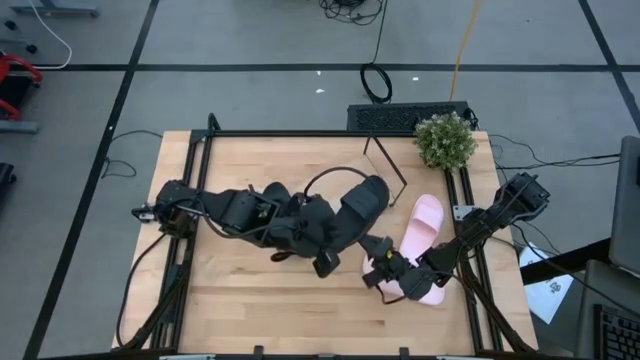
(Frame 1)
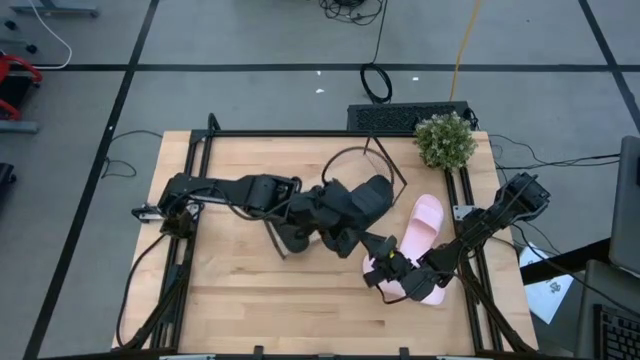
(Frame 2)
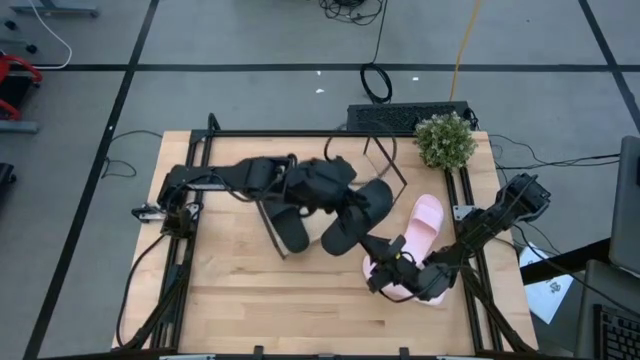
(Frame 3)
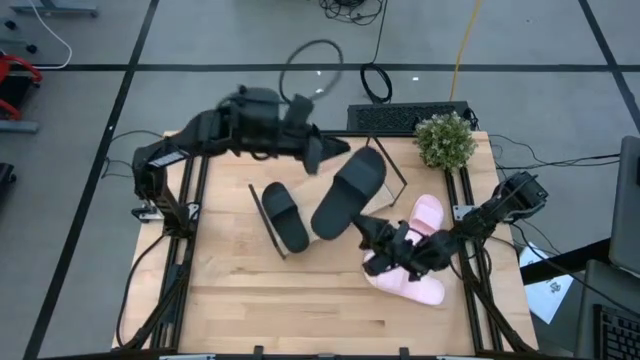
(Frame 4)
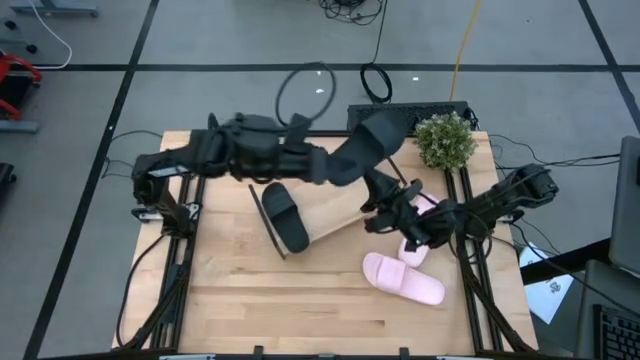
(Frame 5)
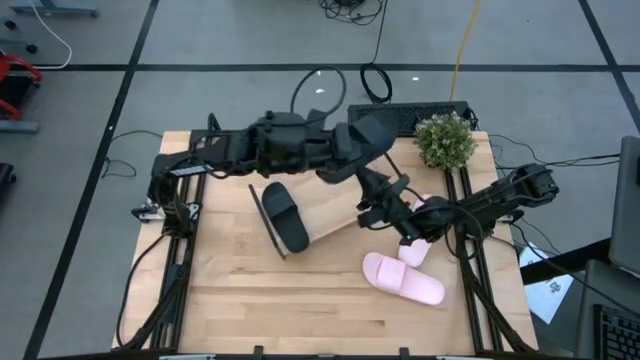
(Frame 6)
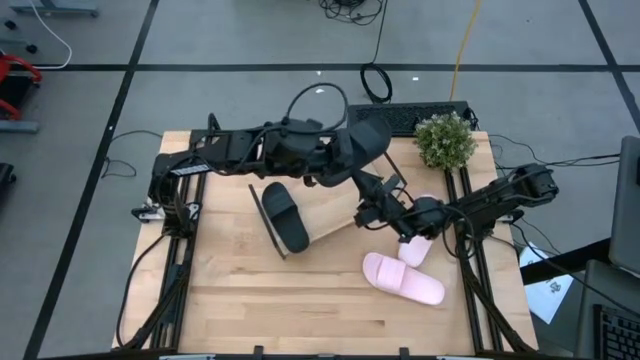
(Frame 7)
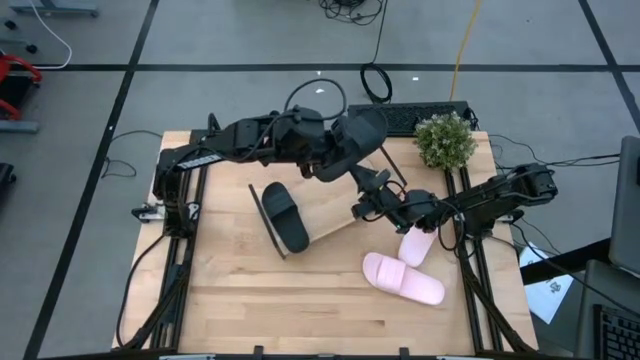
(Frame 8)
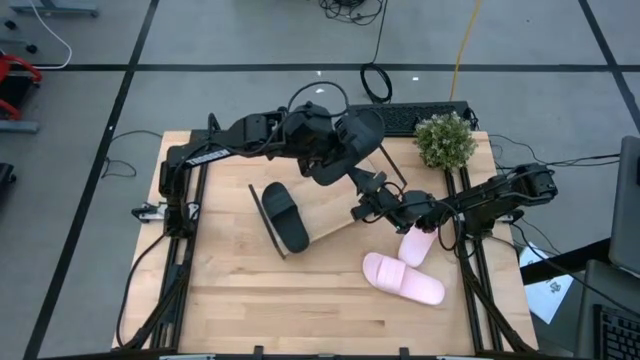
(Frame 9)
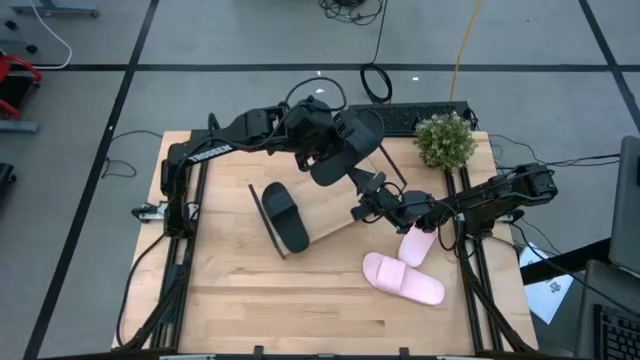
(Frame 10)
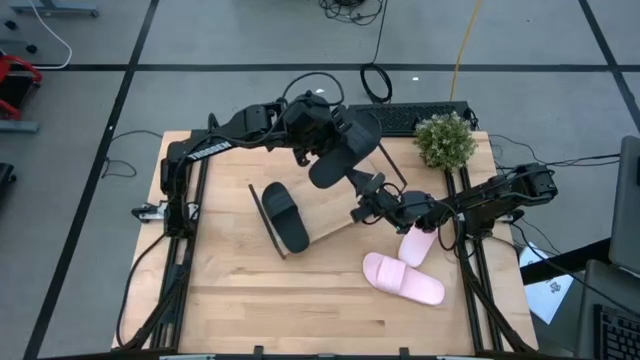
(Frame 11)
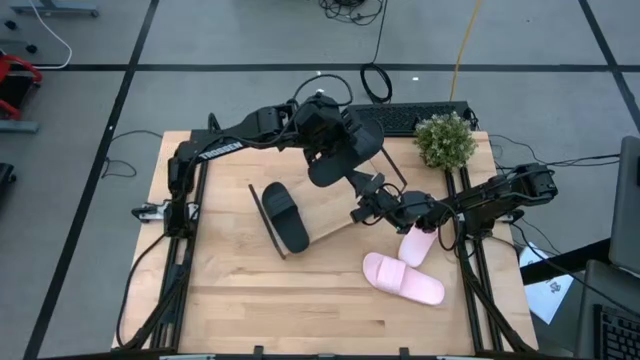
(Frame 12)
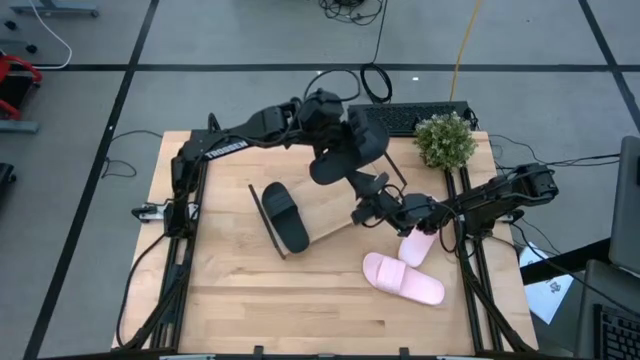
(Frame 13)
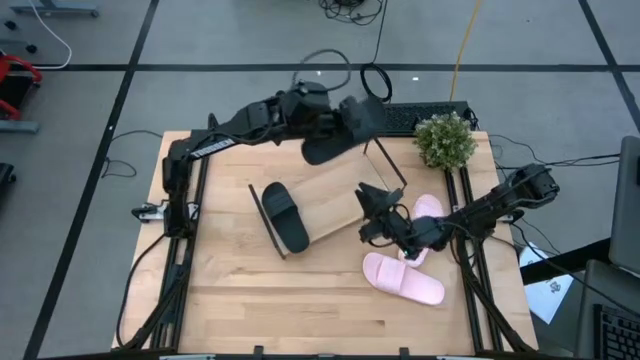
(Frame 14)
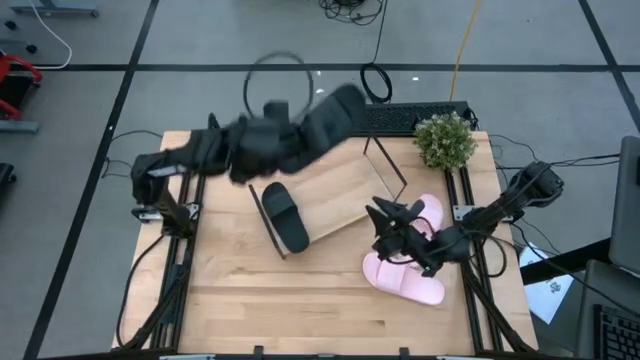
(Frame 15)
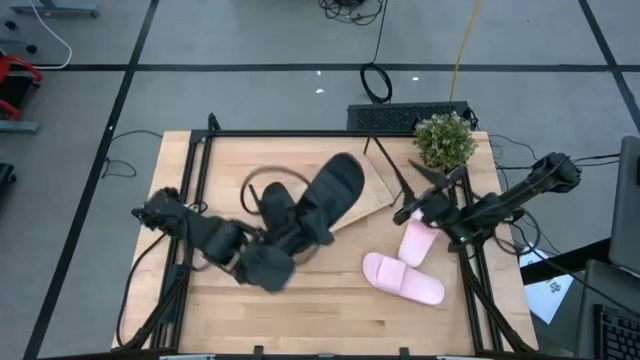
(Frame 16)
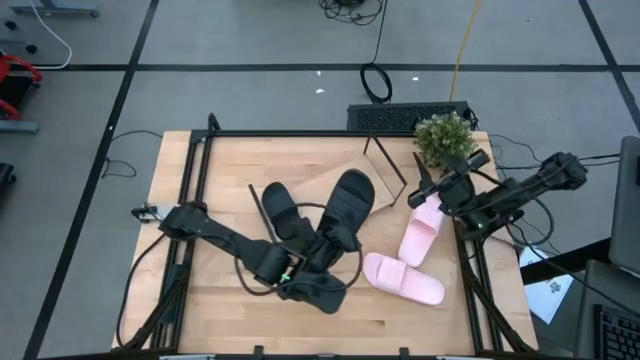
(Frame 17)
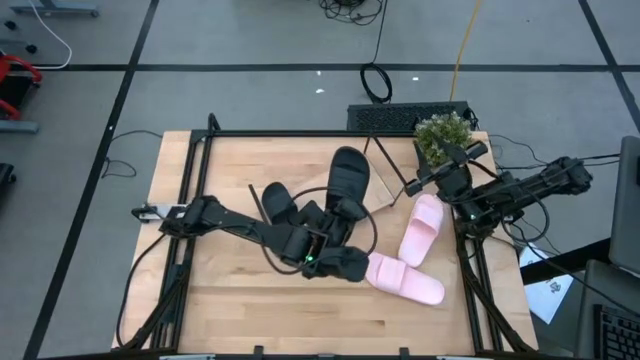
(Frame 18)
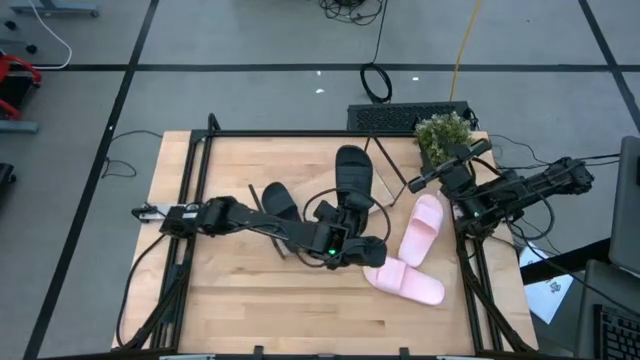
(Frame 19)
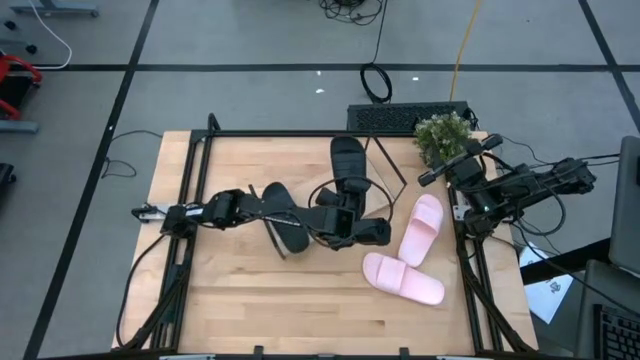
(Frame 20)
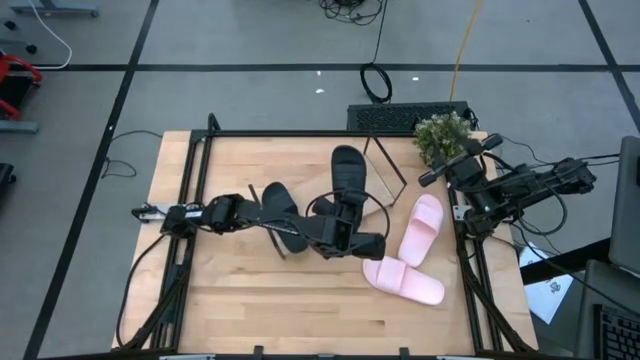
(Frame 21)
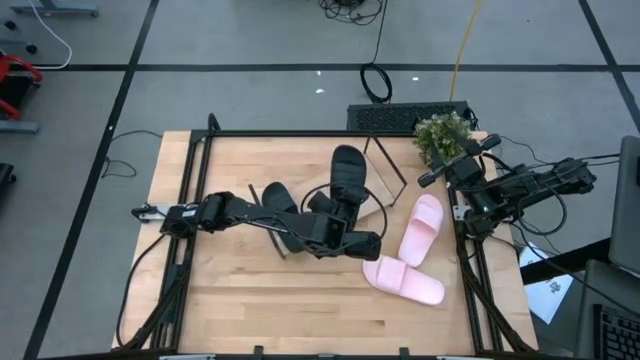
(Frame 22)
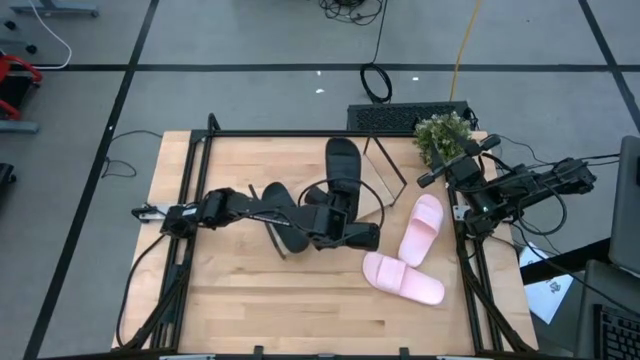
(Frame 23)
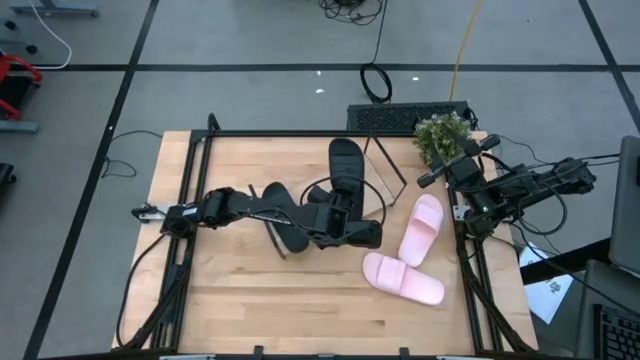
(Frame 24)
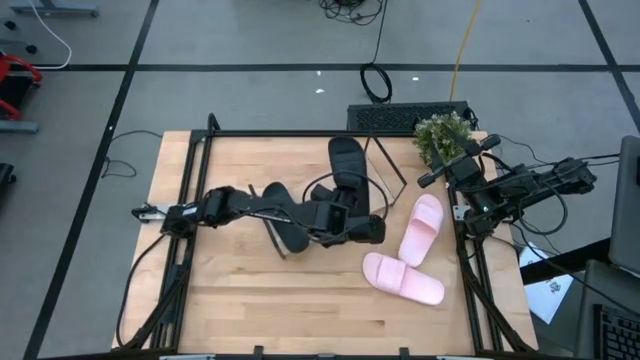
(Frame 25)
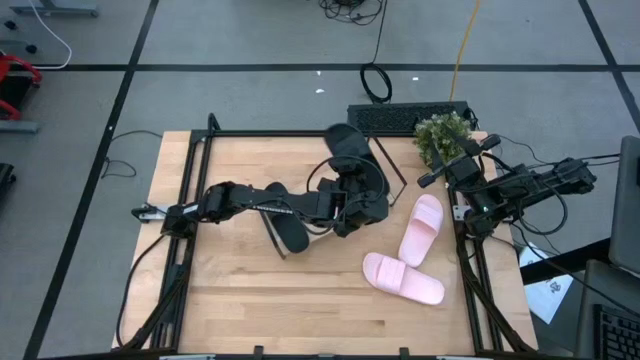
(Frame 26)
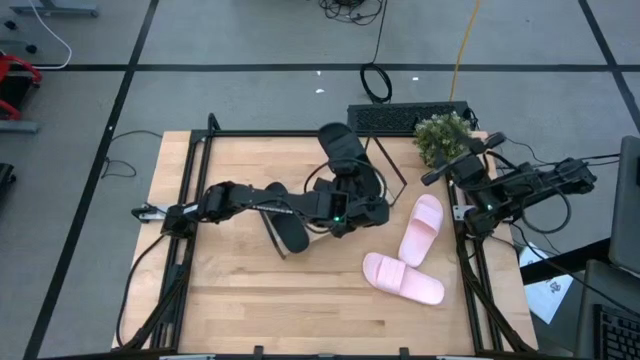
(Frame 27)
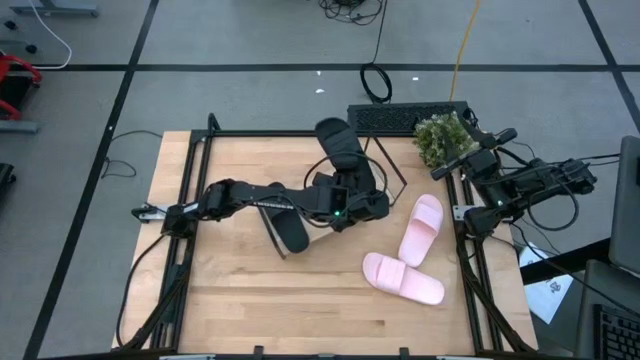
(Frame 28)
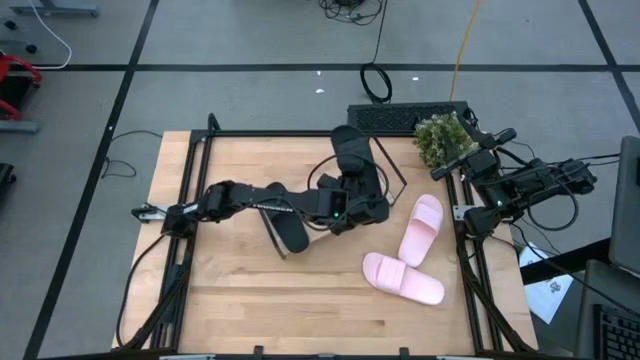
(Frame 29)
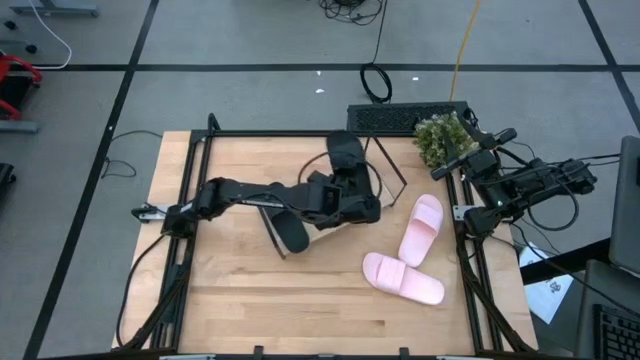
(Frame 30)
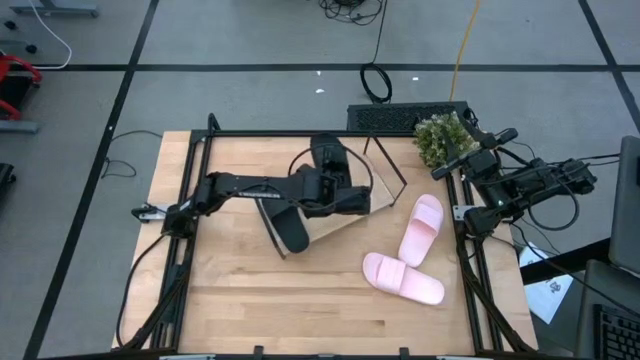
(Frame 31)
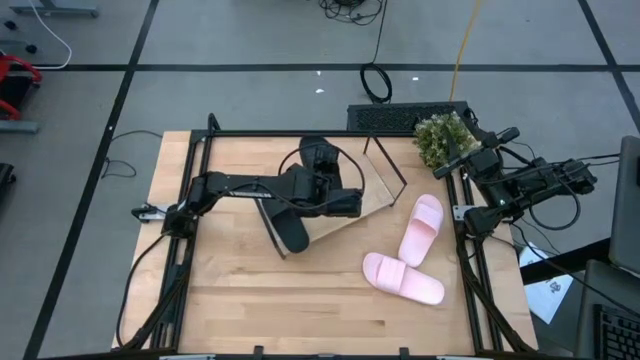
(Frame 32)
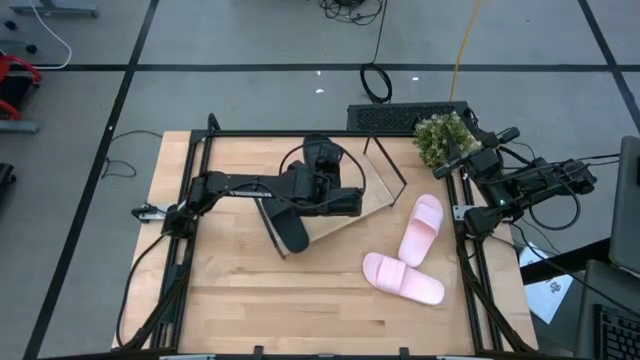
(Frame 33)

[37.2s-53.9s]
Task: Pick and place slides into the shelf
Put the black slipper on the shelf

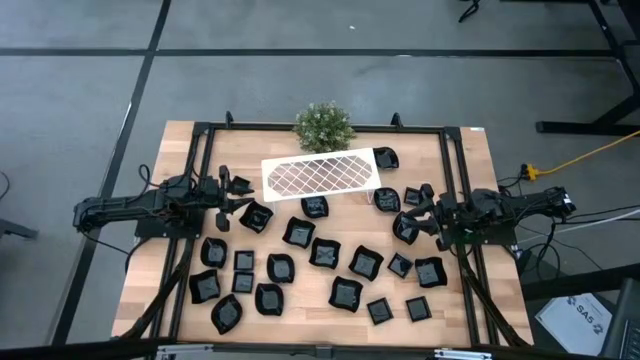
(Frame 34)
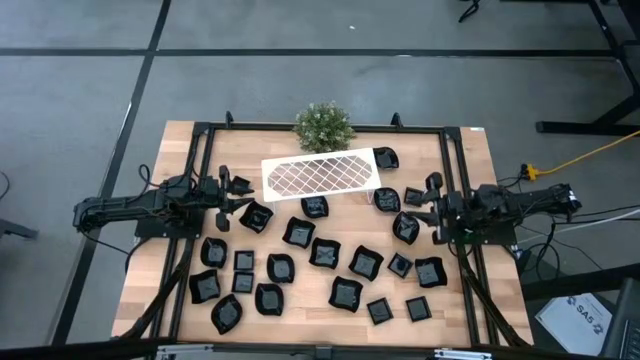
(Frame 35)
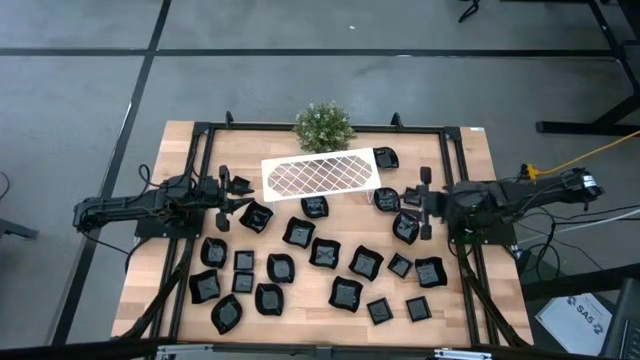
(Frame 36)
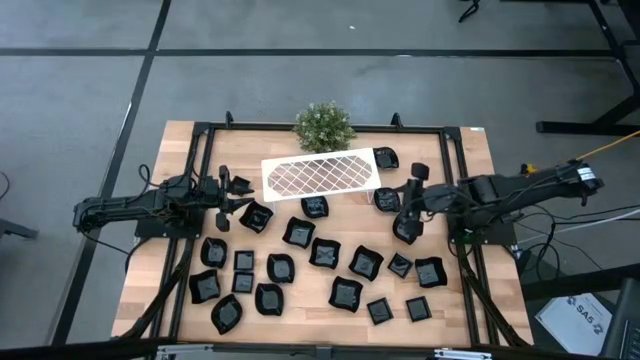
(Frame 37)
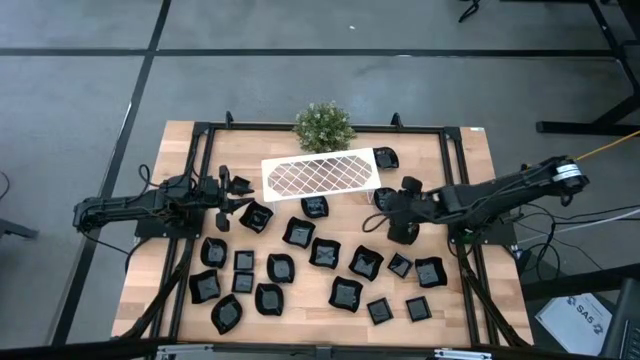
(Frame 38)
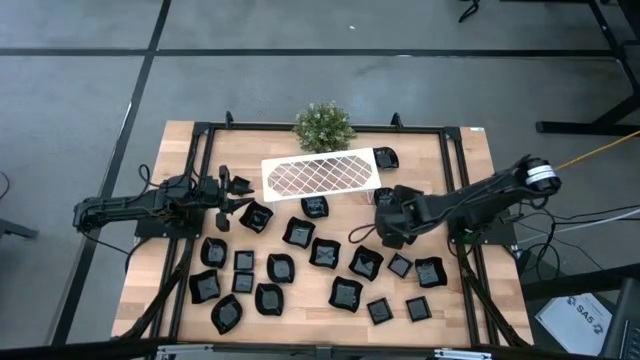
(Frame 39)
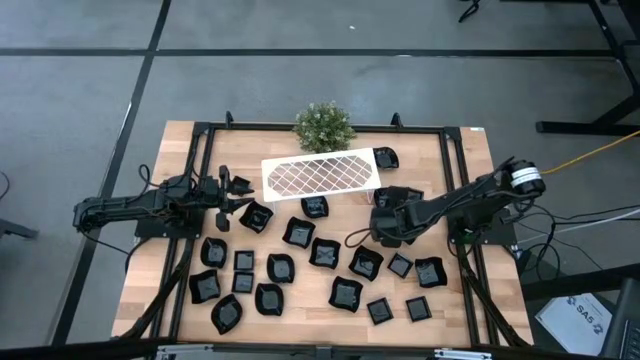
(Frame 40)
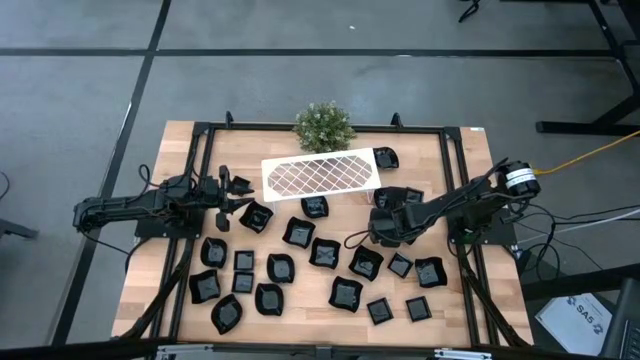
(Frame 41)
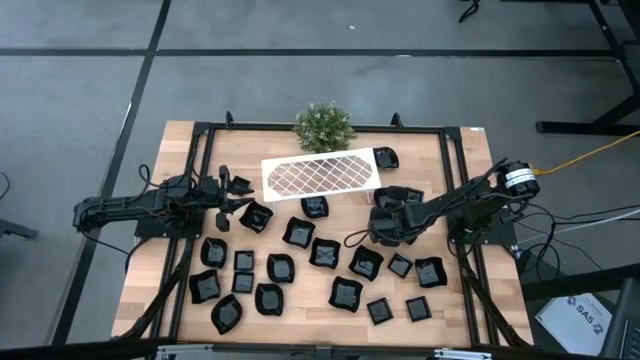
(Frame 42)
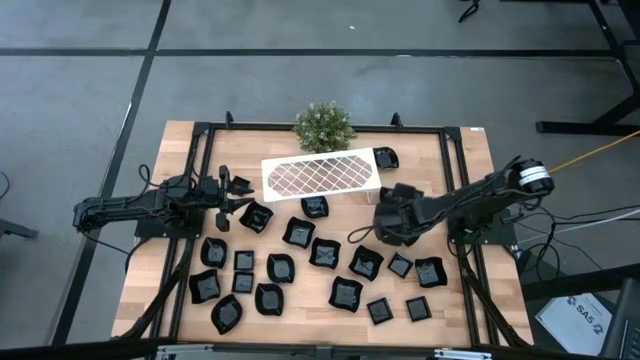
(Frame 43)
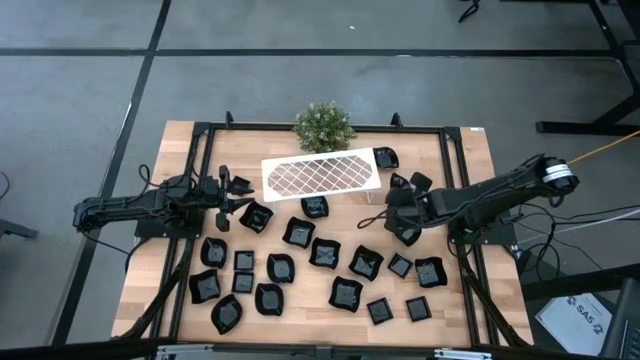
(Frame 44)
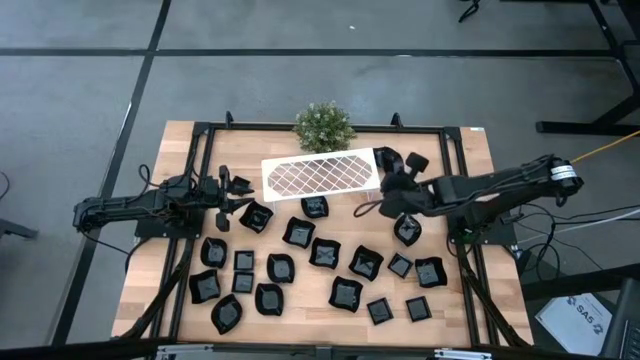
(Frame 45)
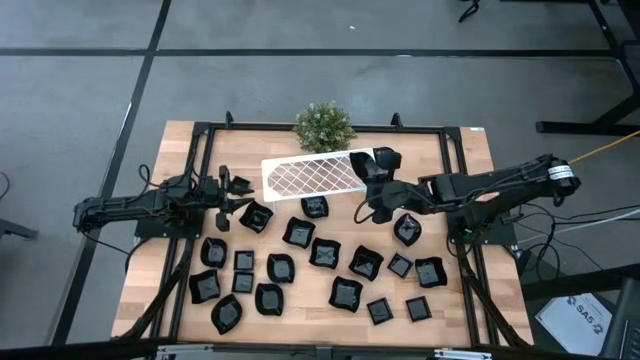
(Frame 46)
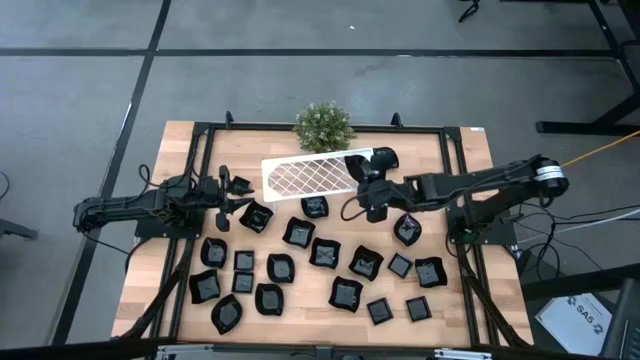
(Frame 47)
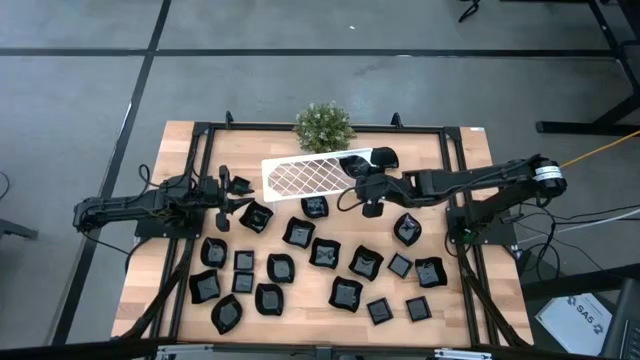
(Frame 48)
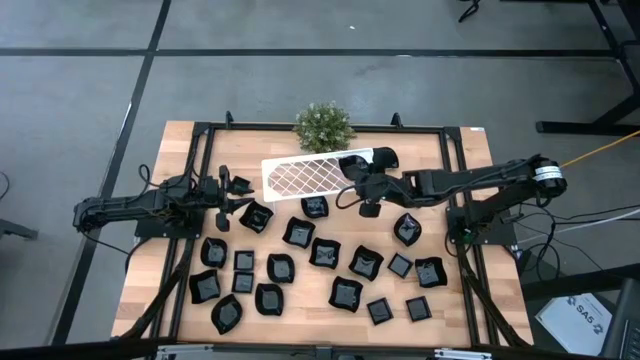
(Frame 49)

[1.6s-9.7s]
Task: Pick & Place Mini shaped plates
Put the leaf shaped plate on the shelf
